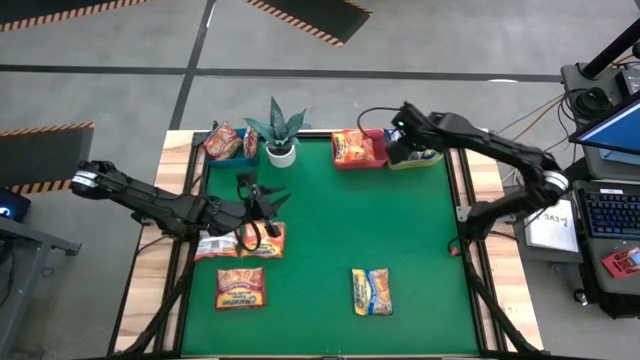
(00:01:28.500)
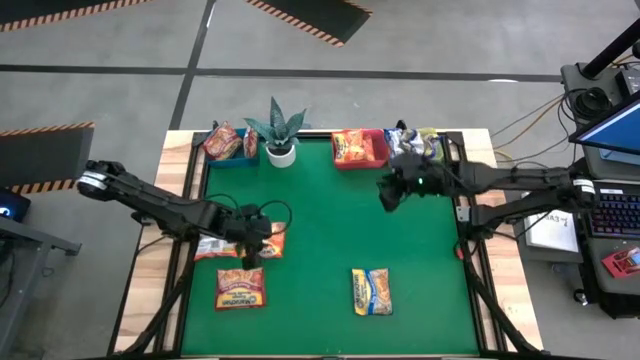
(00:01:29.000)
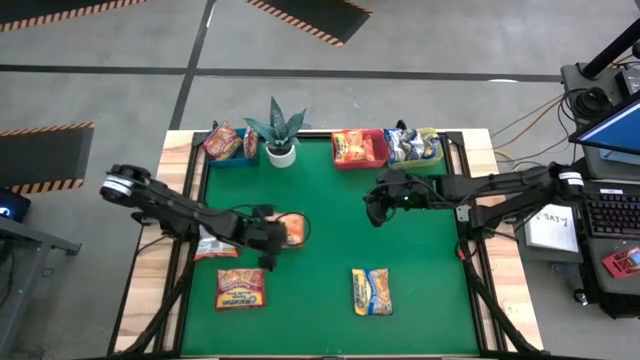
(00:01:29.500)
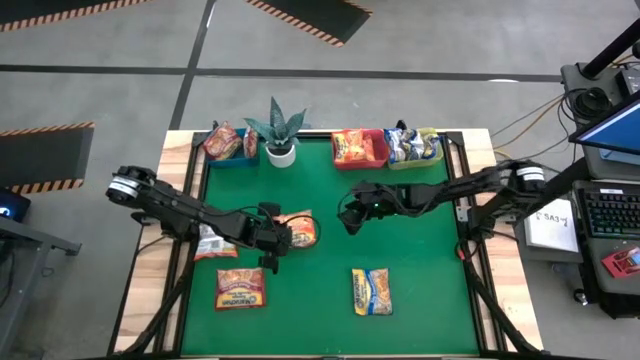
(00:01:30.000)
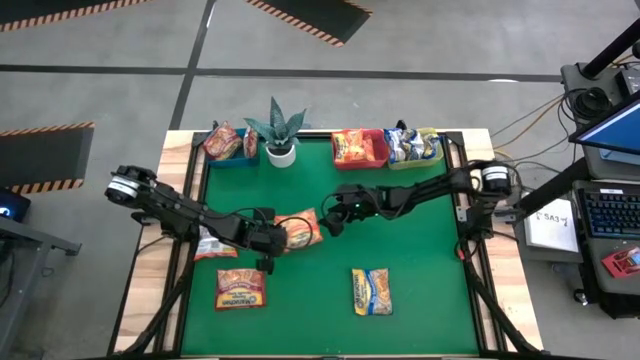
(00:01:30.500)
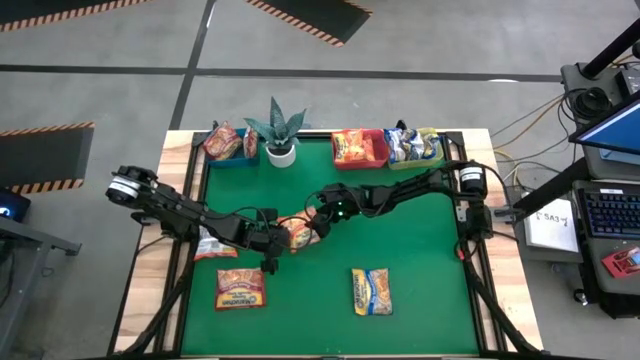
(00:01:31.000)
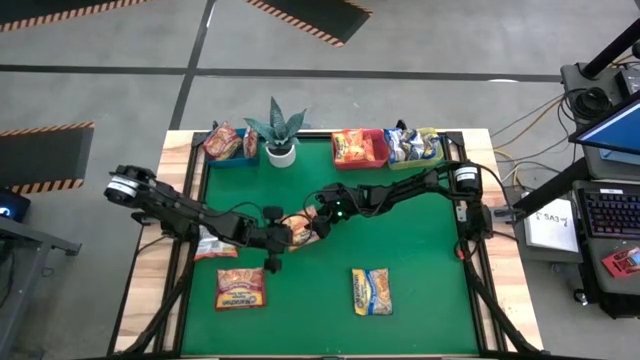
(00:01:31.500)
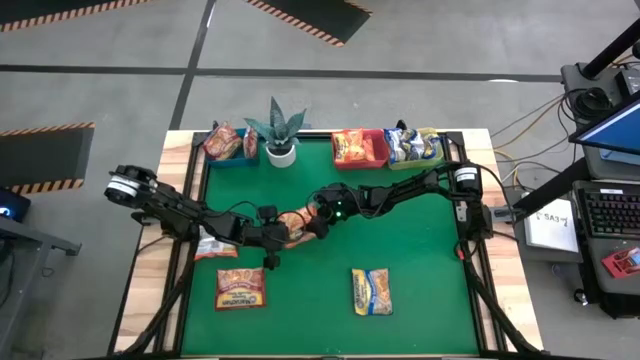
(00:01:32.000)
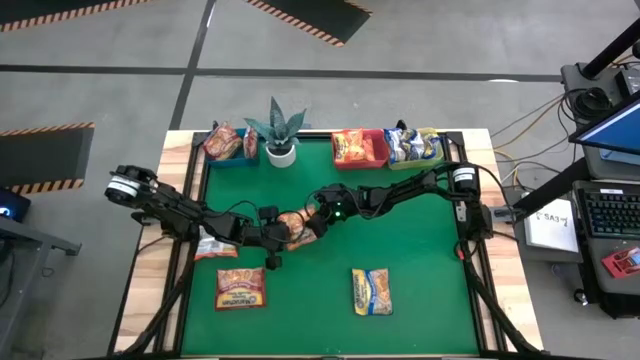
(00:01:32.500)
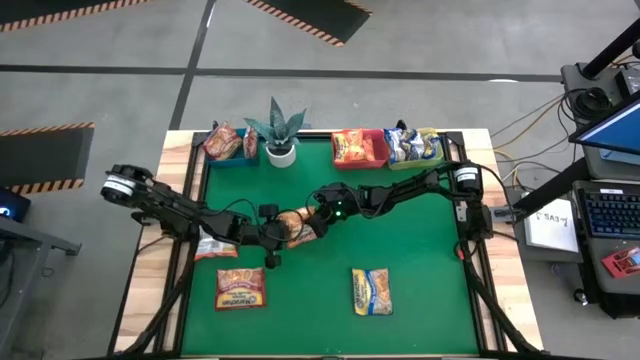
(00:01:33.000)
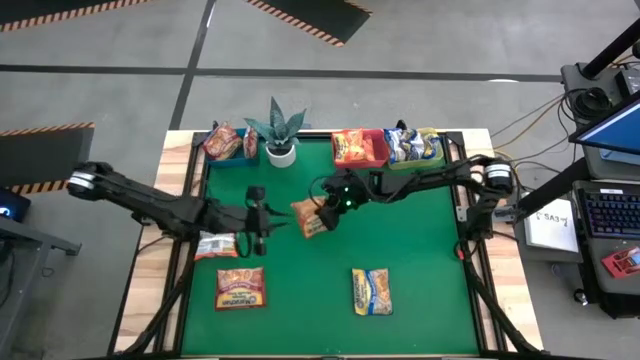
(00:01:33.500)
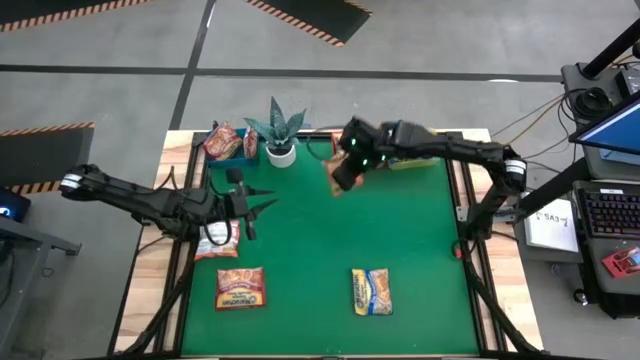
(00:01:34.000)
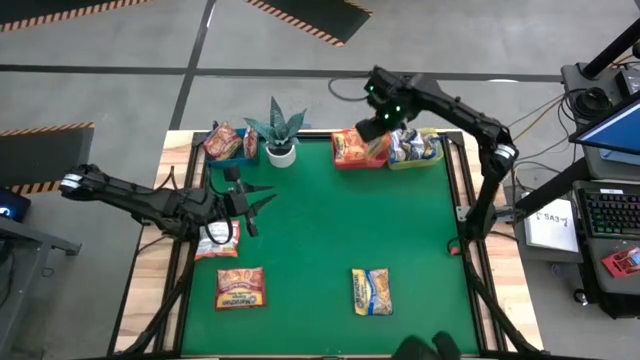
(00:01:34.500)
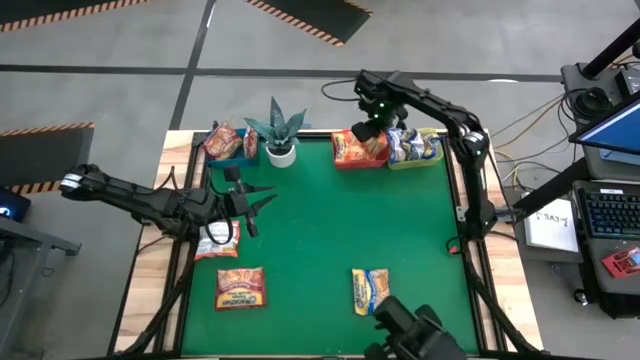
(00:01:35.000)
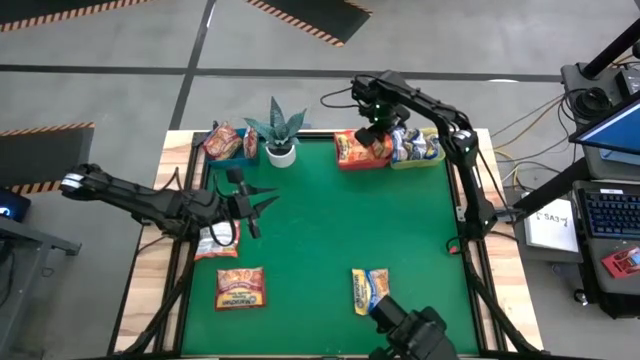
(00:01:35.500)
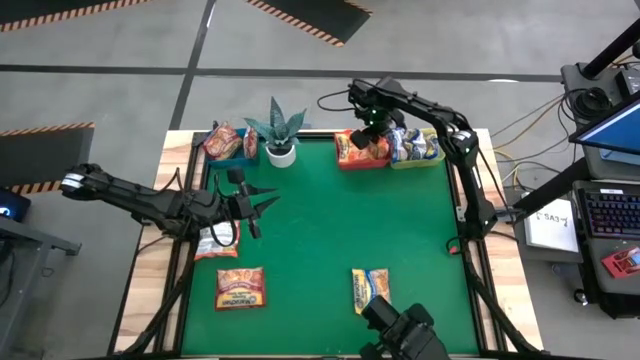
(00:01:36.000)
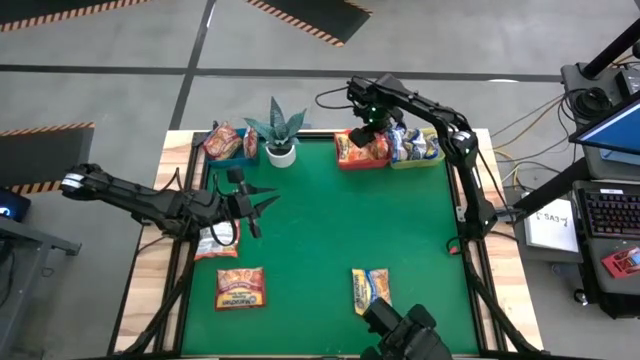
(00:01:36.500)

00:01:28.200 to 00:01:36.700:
Task: Sort Maruchan noodles
Put the orange noodle pack into the red bin

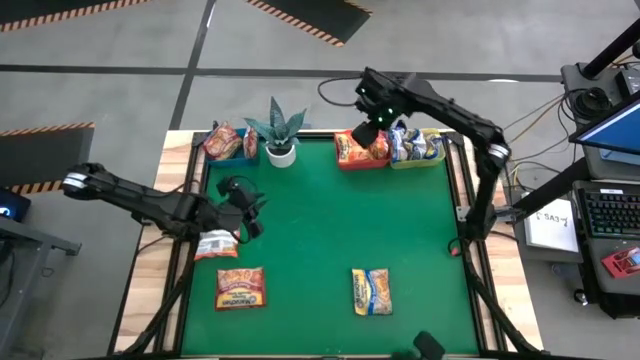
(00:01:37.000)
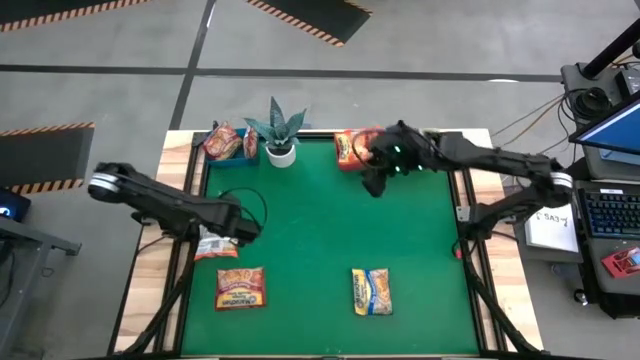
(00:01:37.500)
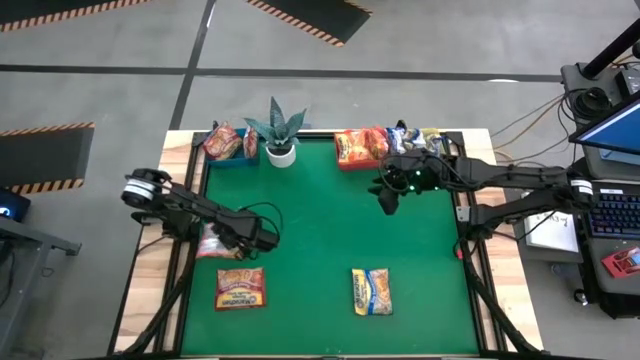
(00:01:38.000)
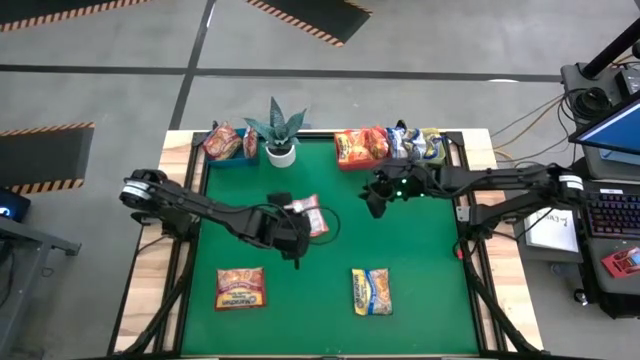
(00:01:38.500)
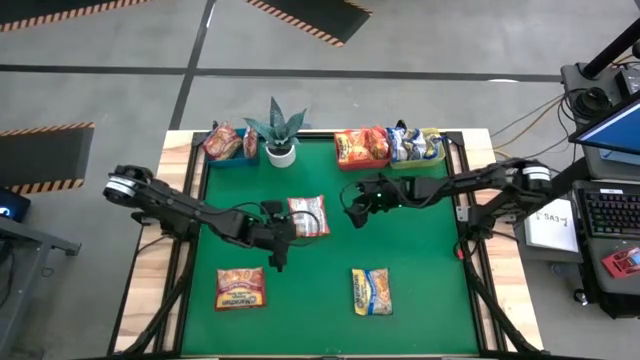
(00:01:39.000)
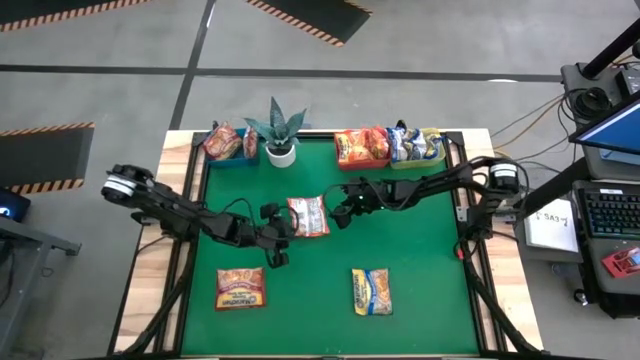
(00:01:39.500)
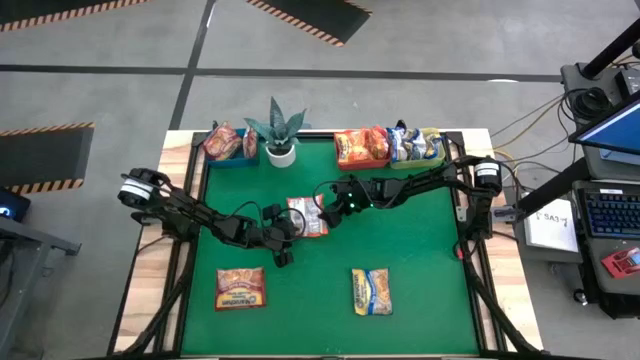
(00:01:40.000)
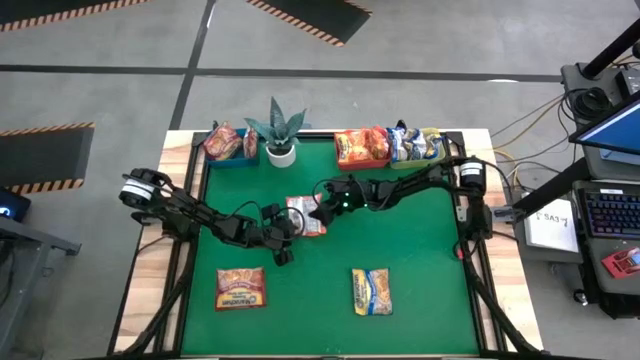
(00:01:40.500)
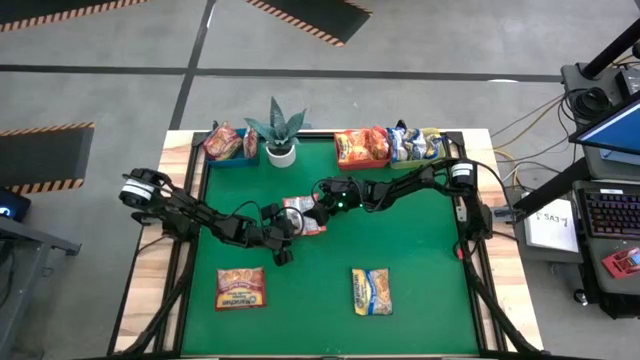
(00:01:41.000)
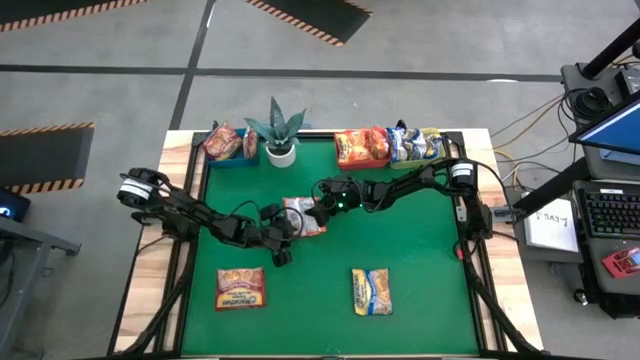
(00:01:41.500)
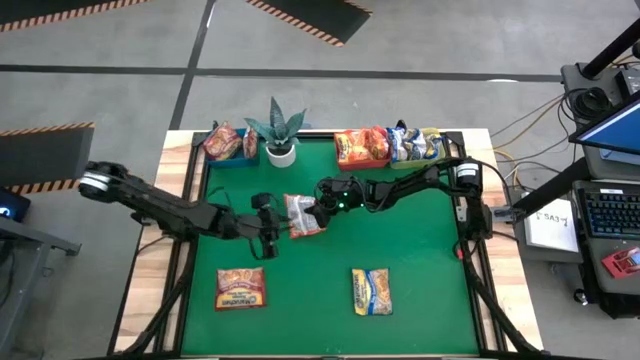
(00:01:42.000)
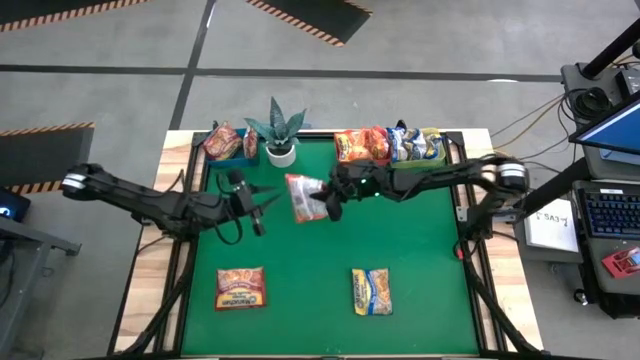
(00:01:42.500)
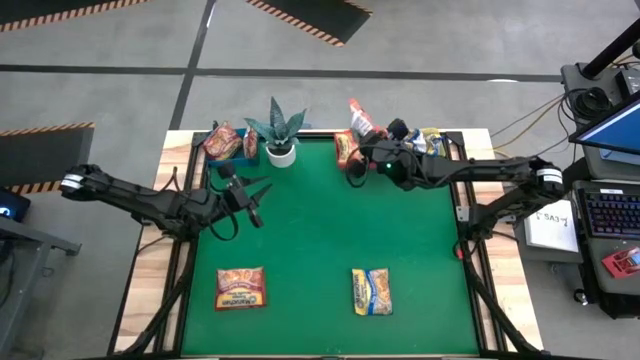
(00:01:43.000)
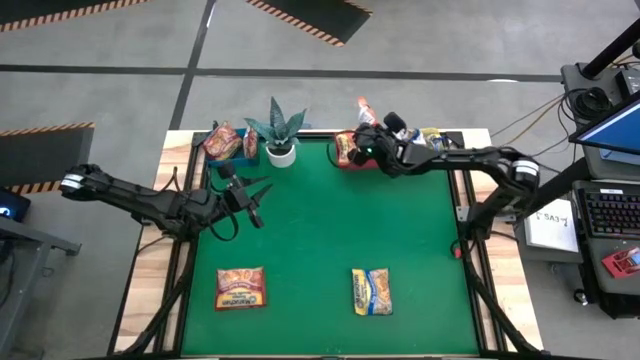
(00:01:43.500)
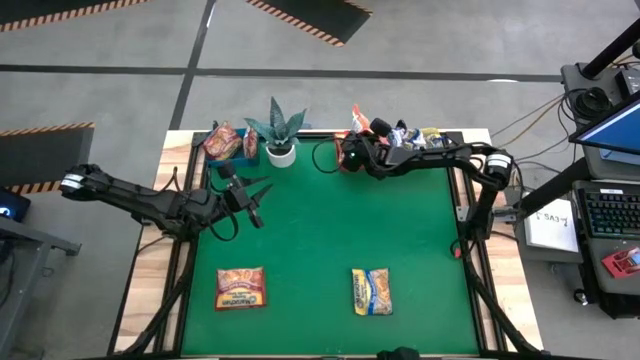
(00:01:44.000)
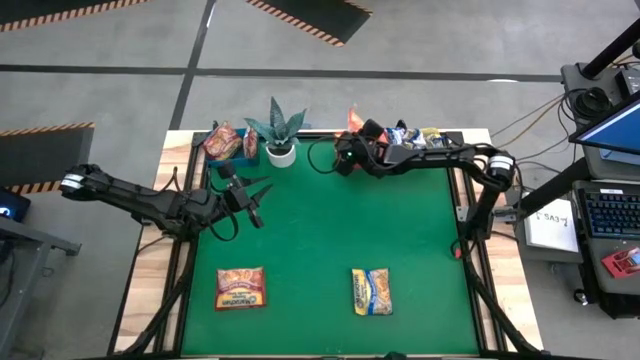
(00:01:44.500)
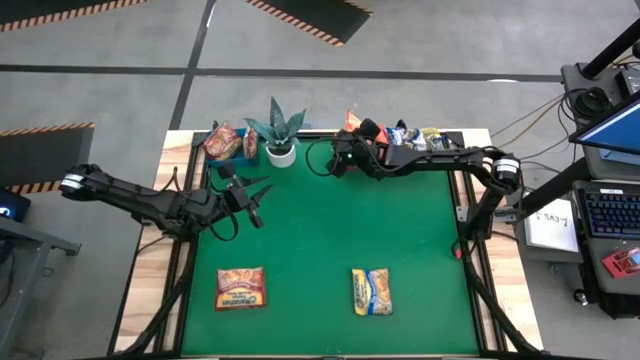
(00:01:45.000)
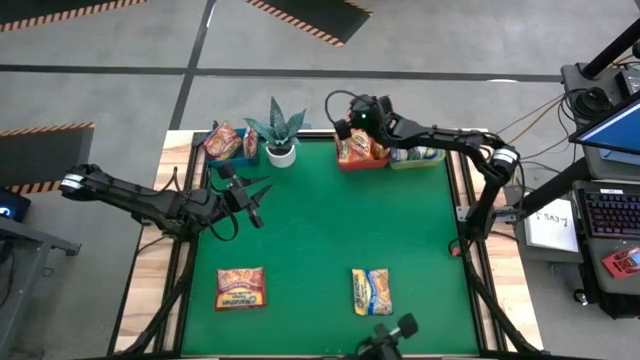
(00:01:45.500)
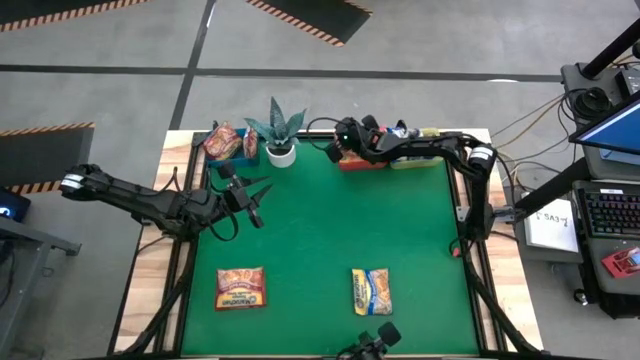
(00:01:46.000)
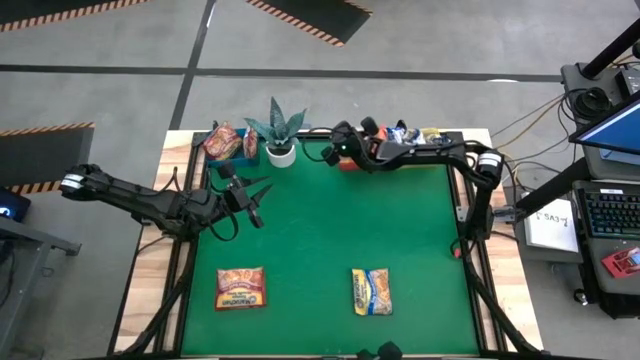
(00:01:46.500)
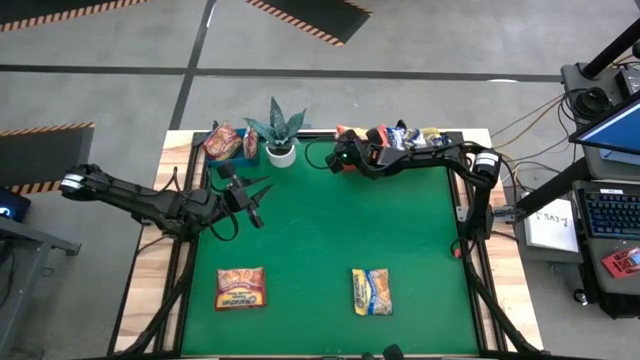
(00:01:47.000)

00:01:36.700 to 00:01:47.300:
Put the orange noodle pack into the red bin
